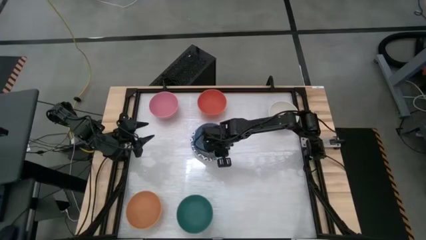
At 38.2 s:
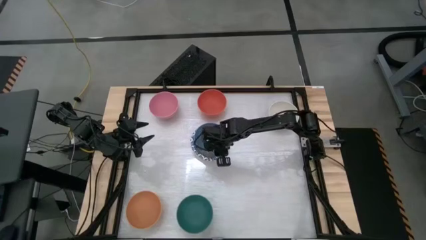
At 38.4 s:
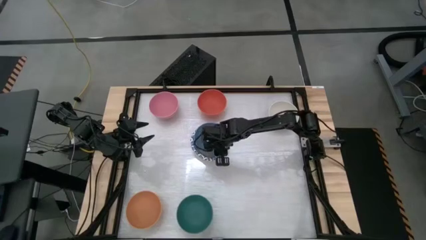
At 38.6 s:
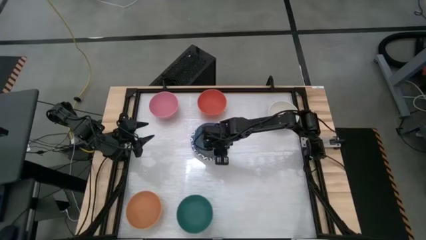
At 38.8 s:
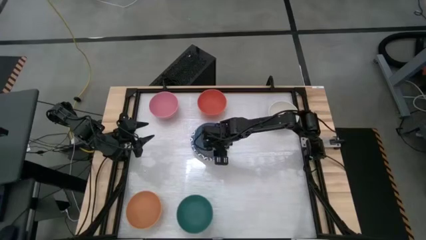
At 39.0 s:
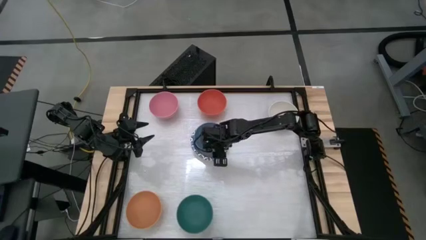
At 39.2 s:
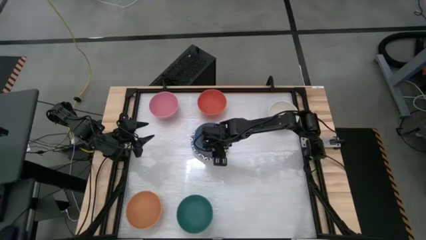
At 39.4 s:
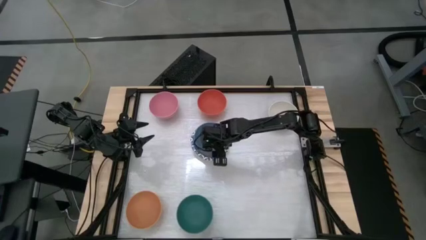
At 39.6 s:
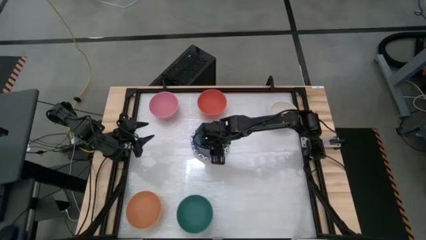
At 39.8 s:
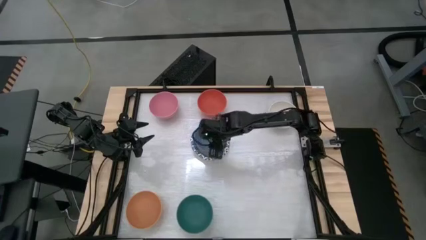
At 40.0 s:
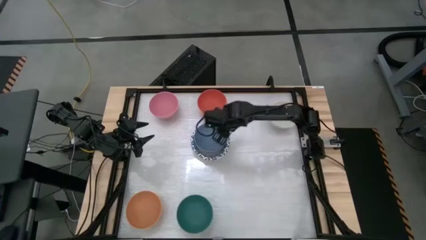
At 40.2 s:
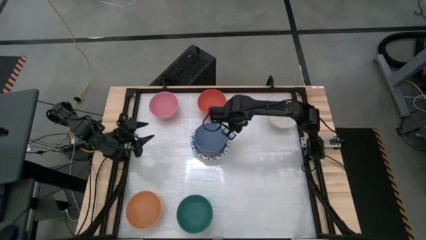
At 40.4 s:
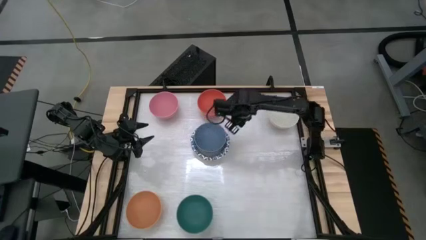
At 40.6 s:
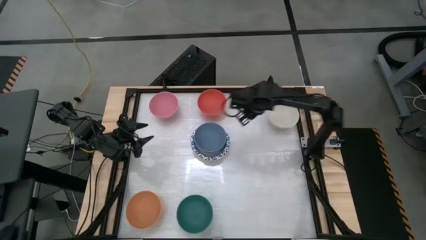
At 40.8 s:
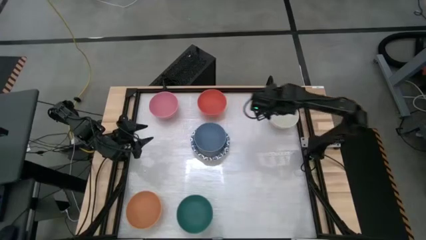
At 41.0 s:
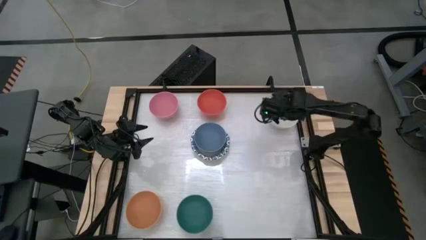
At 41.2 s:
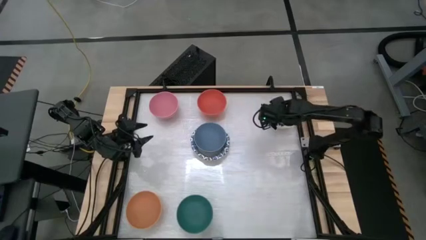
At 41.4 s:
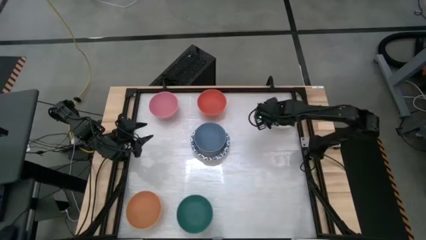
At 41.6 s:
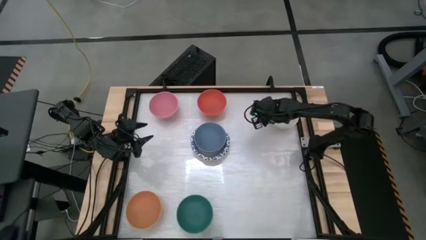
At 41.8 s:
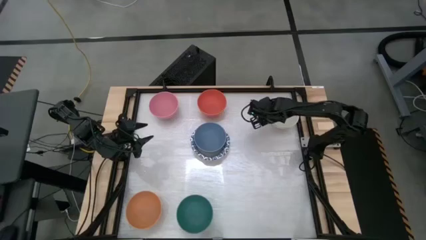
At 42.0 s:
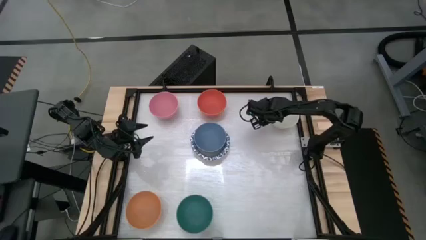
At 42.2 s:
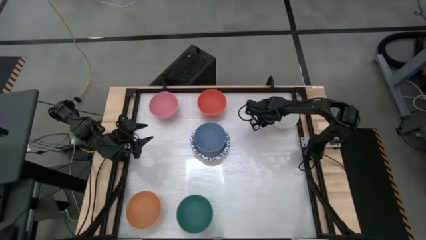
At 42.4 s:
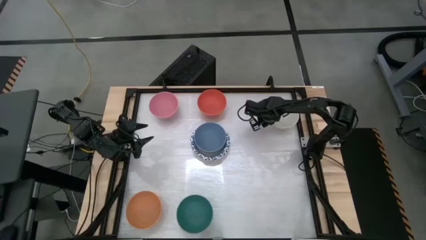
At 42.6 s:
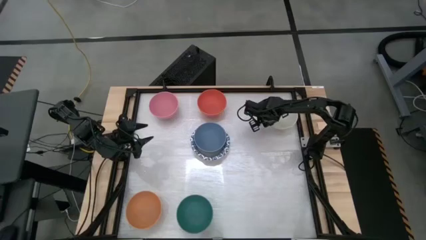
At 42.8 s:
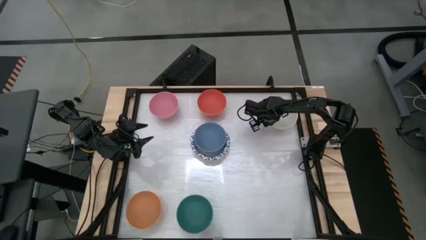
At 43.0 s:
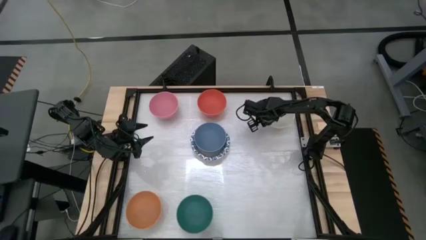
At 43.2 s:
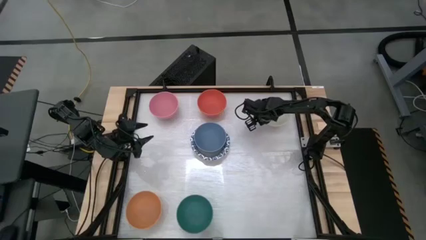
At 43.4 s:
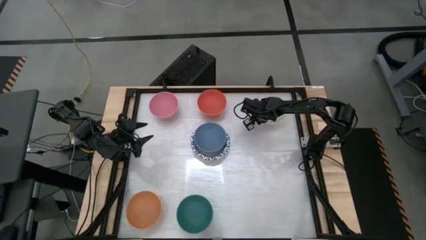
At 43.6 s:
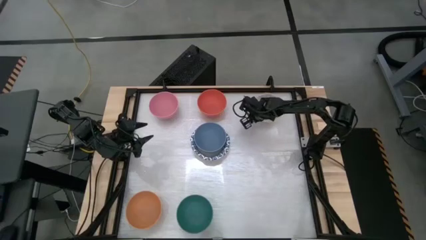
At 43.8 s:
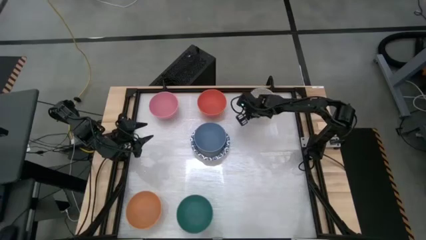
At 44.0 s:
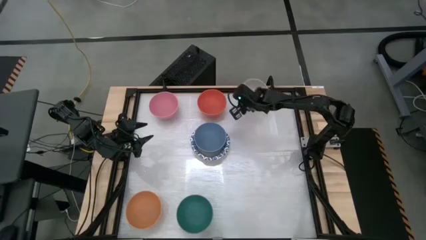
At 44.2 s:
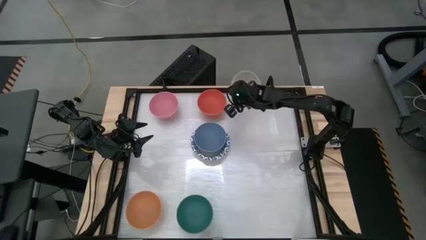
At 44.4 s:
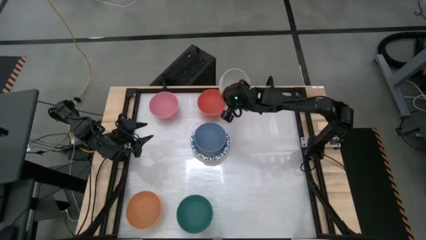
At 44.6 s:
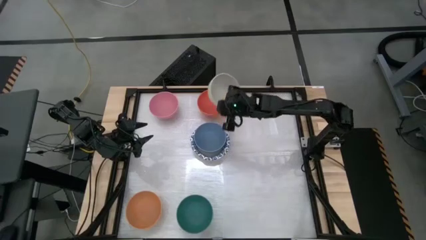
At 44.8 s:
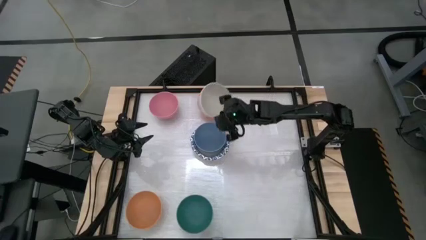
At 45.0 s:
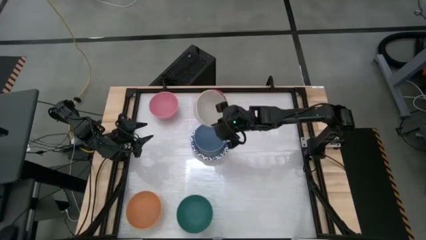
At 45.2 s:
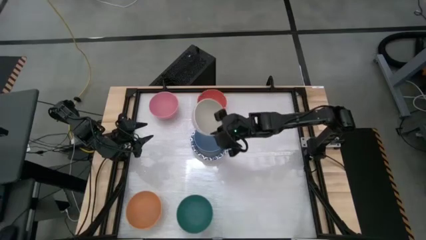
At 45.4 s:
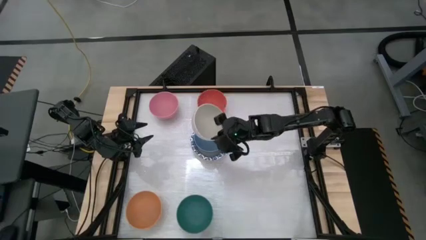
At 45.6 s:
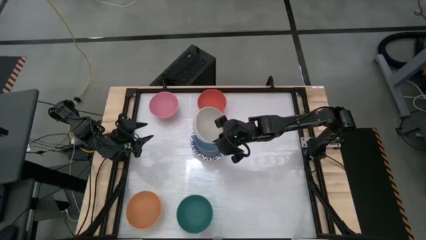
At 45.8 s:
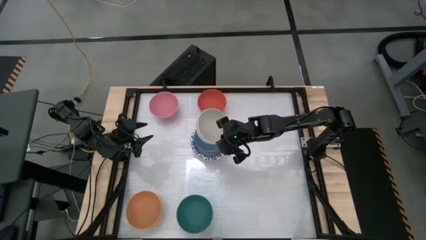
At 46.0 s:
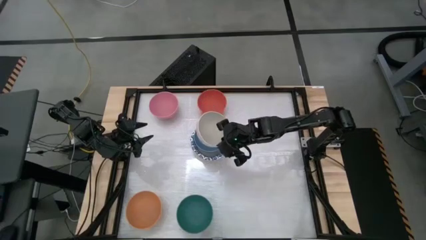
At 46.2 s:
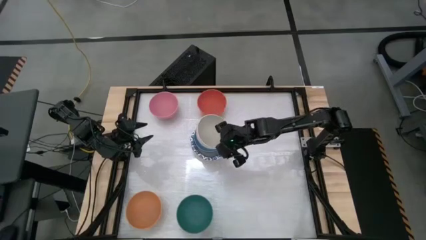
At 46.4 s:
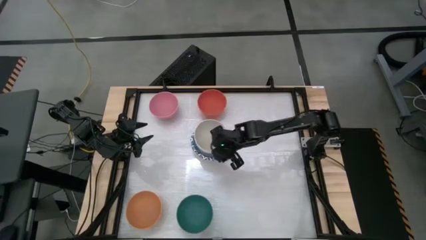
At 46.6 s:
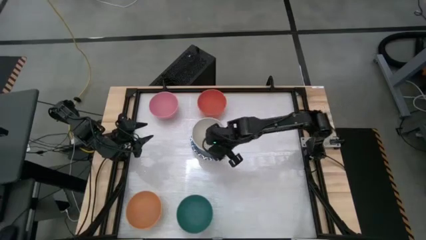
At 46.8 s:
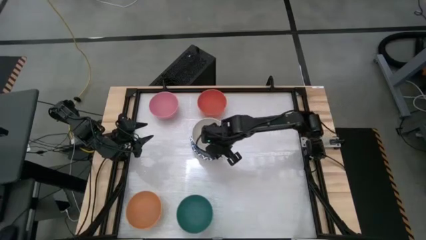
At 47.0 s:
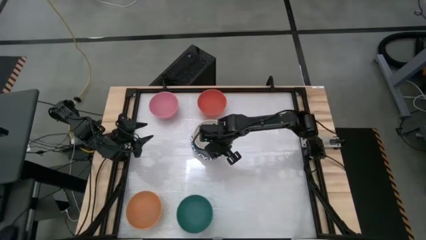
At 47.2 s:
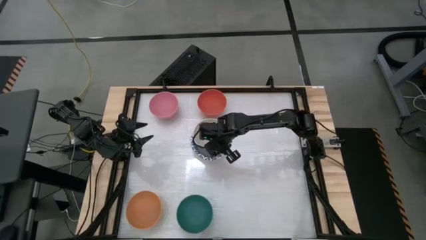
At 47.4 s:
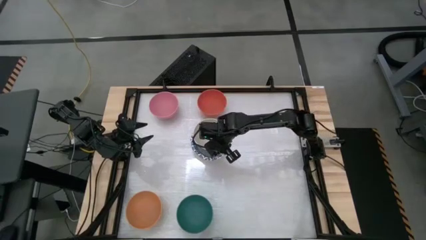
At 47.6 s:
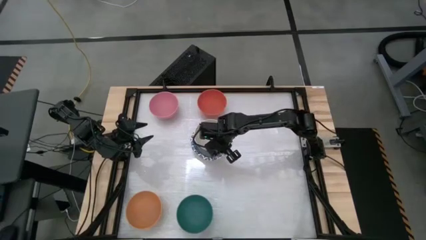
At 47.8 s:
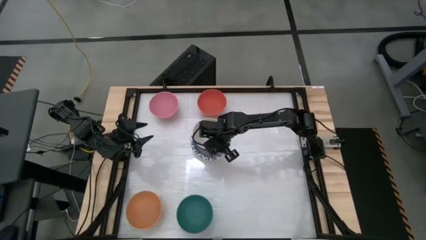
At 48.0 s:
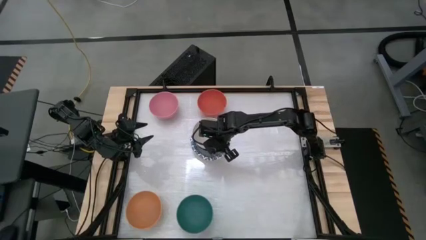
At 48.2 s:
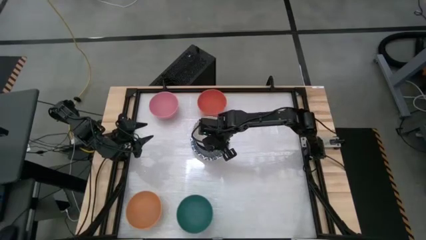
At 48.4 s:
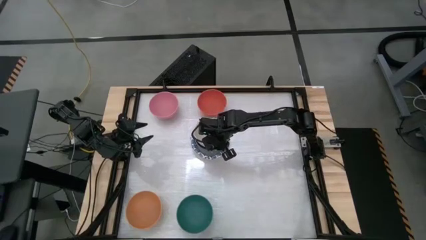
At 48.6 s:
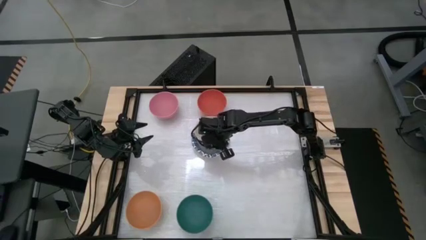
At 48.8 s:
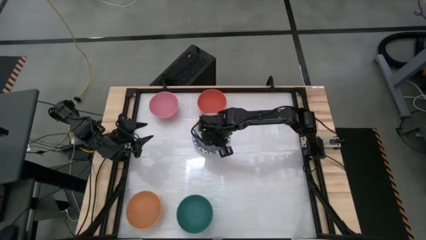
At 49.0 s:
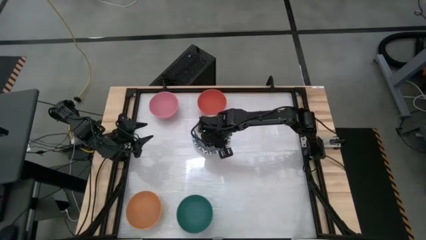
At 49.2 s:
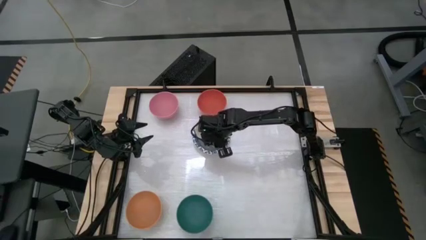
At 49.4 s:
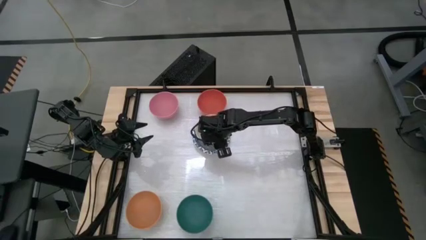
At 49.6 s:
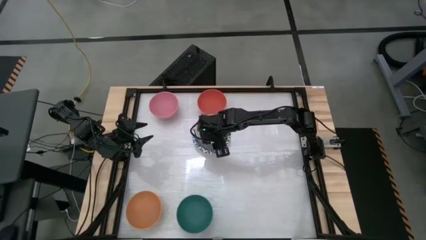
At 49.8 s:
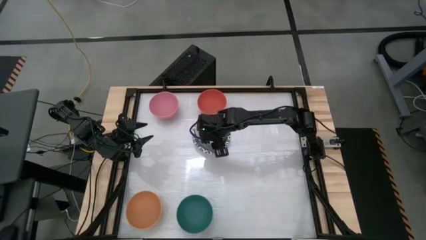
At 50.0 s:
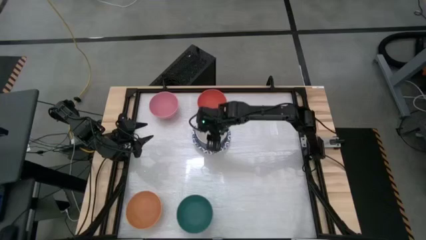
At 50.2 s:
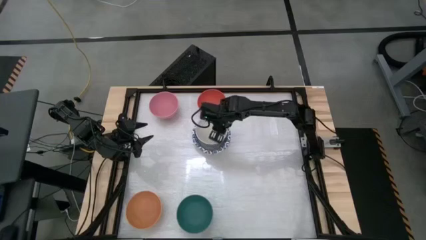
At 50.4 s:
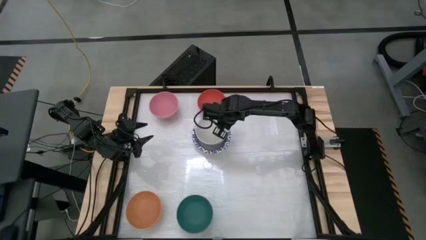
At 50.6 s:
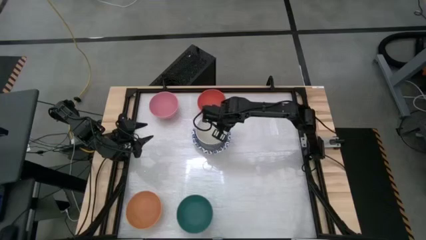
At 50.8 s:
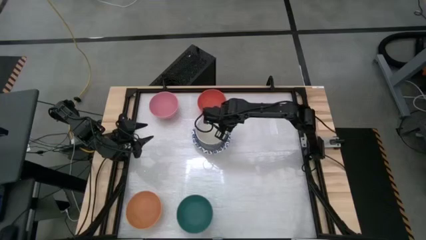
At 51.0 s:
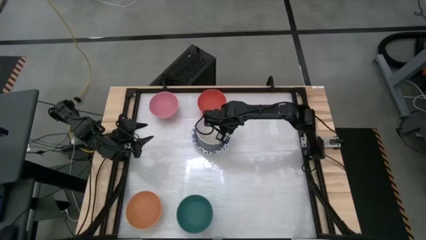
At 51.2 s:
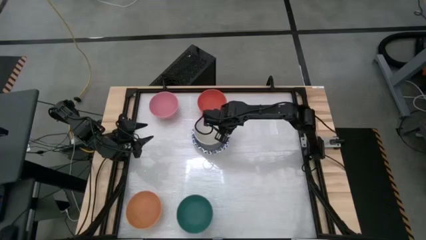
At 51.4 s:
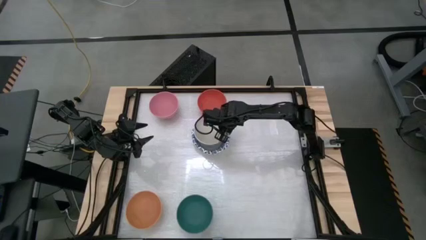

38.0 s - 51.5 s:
Stack the white bowl on top of the blue bowl
